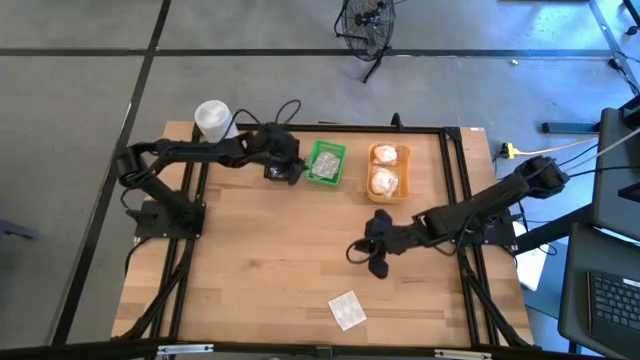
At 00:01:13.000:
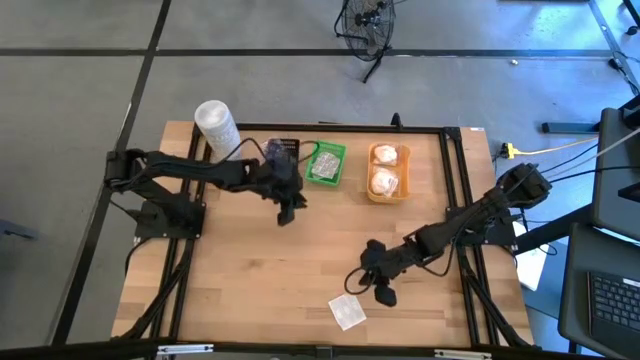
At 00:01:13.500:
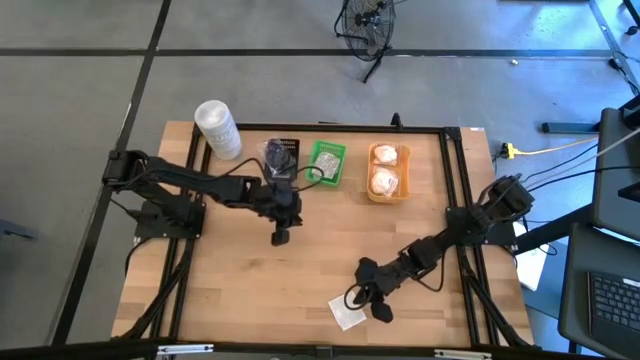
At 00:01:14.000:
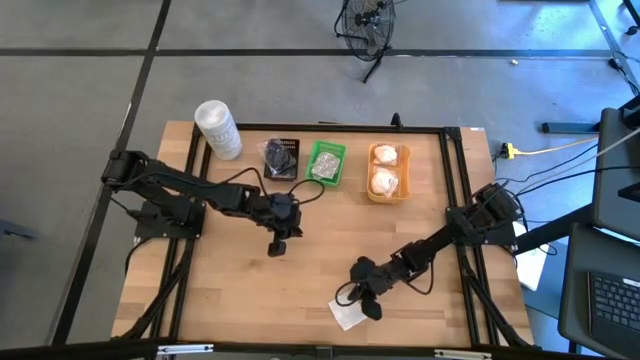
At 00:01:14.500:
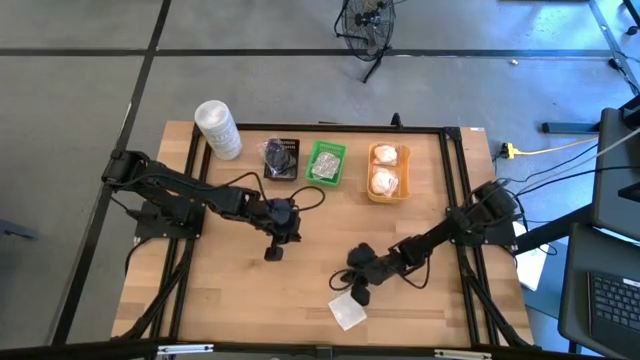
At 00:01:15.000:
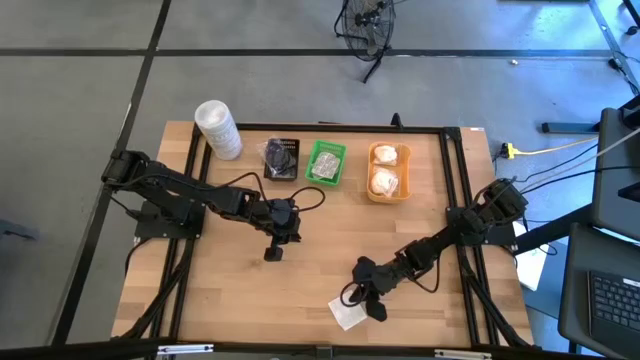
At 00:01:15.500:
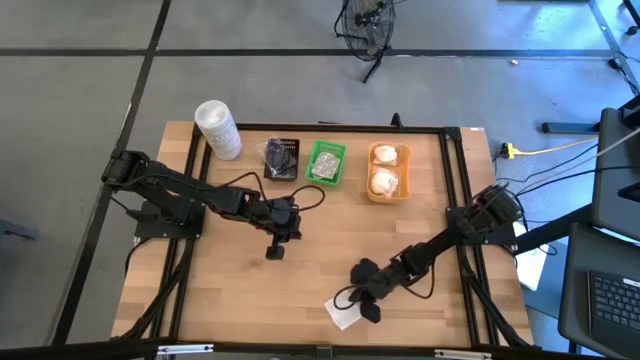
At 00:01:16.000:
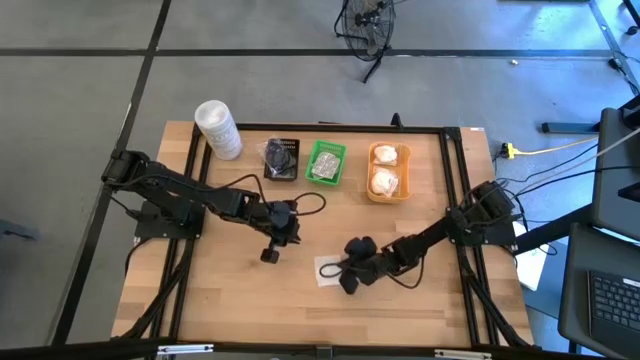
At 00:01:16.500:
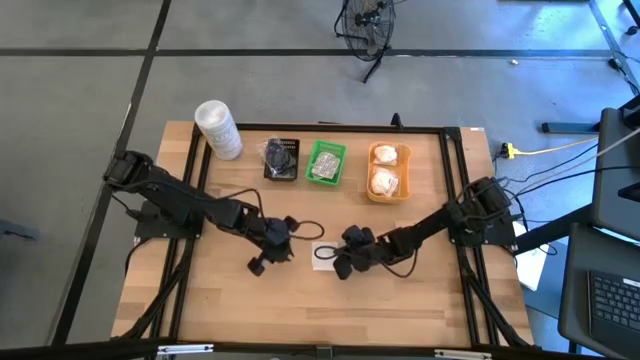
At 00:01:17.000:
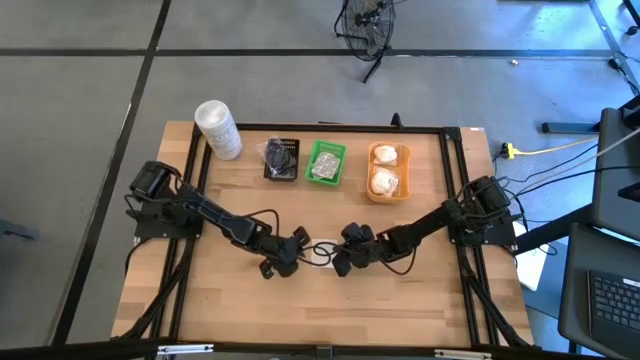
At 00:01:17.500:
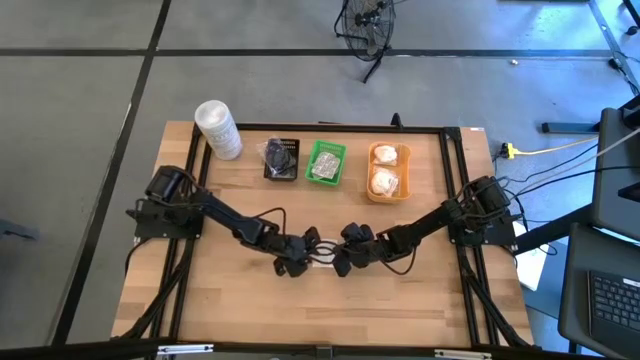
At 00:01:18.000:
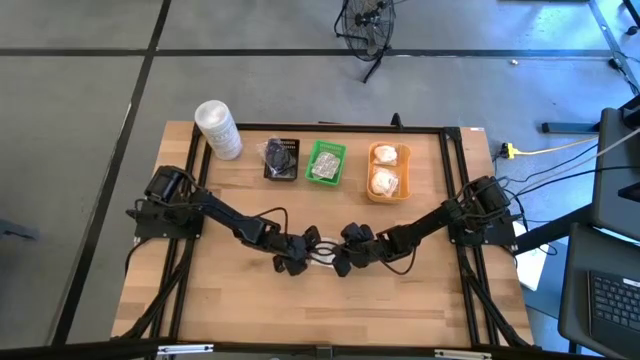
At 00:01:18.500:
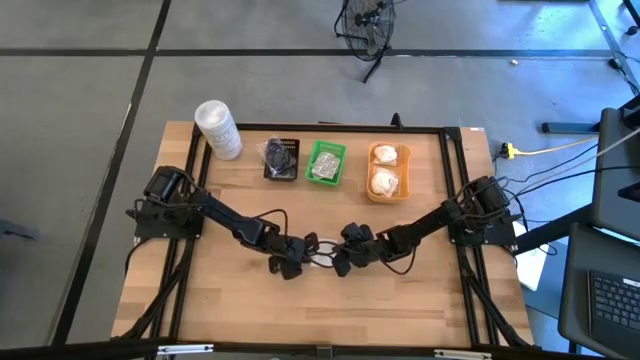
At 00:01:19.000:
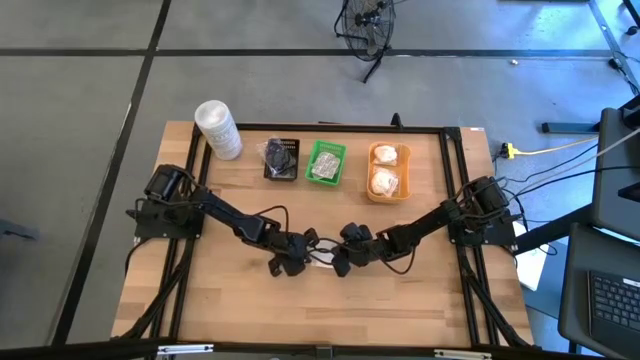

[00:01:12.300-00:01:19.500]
Task: Pick & Place Travel size toiletries
Put the white bandage pack into the green bin

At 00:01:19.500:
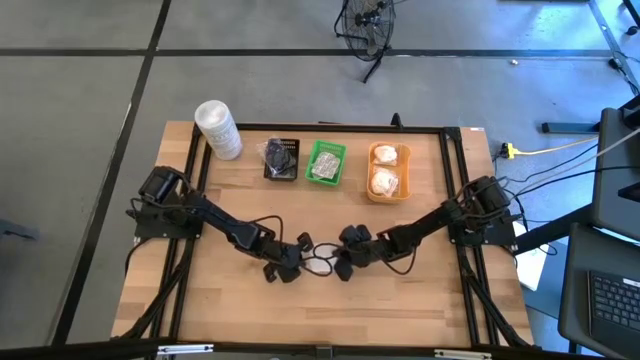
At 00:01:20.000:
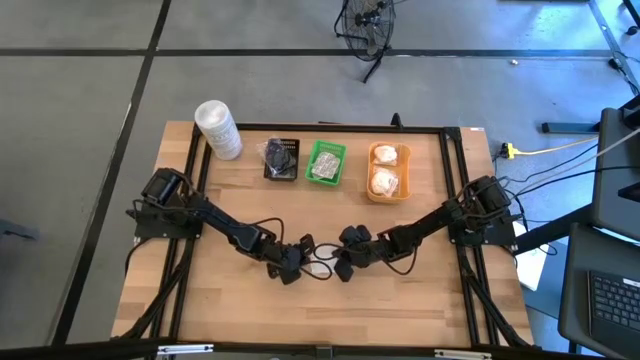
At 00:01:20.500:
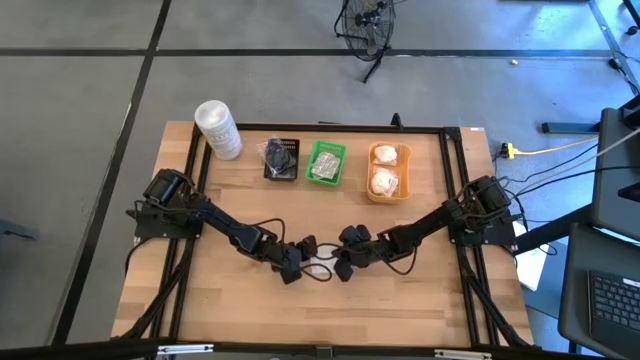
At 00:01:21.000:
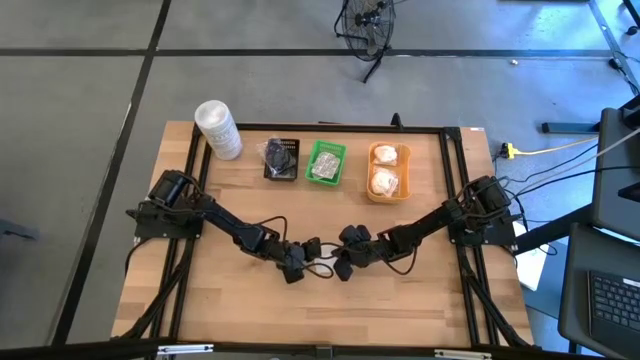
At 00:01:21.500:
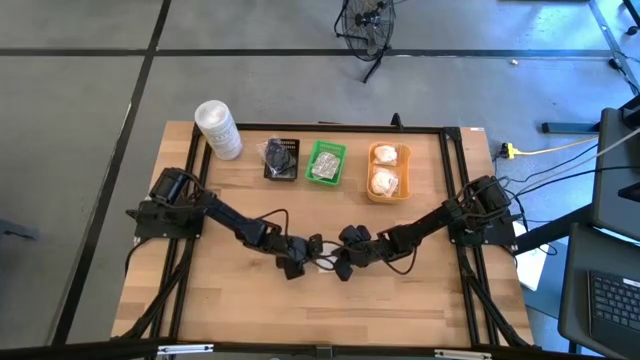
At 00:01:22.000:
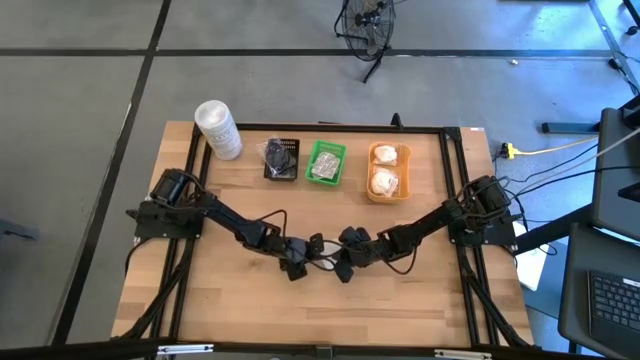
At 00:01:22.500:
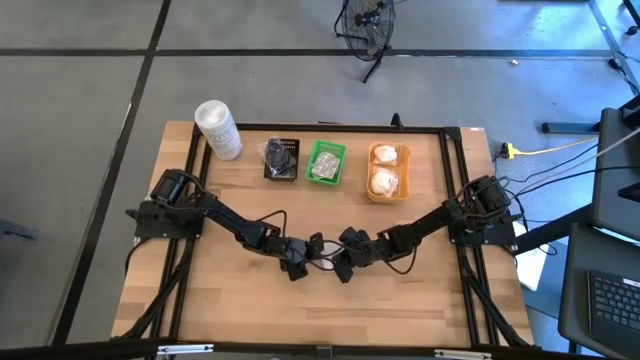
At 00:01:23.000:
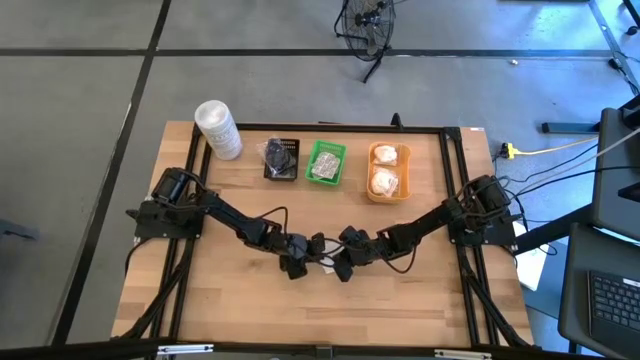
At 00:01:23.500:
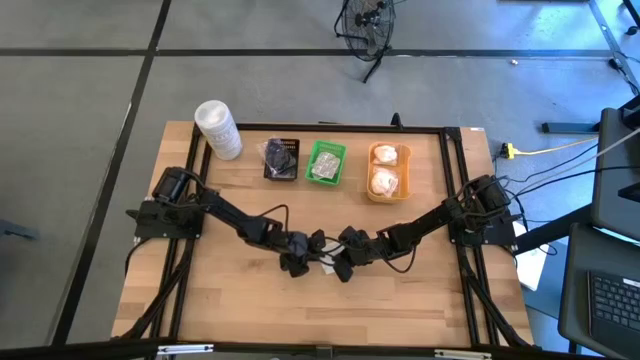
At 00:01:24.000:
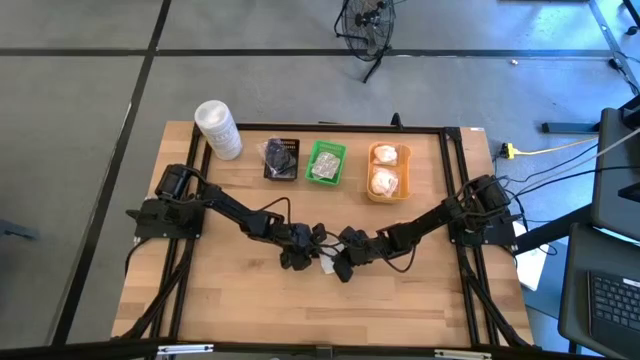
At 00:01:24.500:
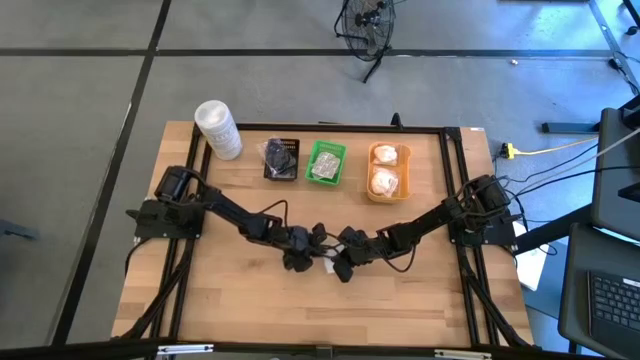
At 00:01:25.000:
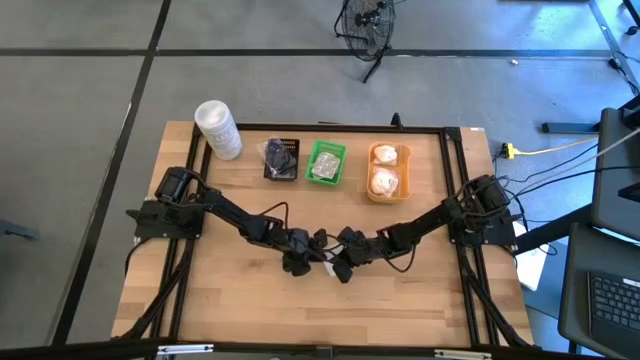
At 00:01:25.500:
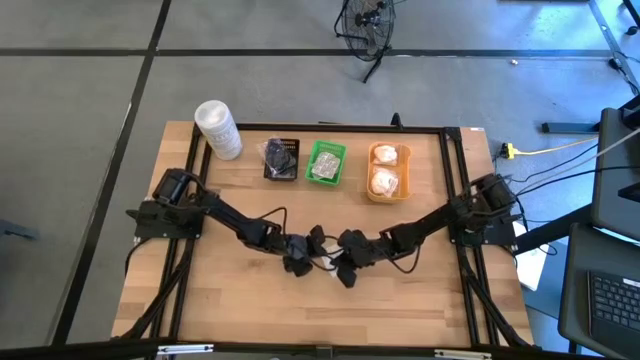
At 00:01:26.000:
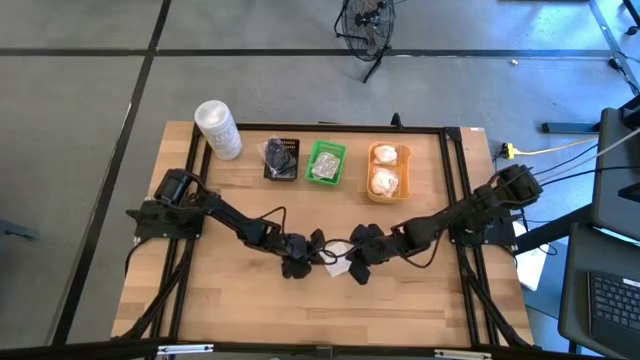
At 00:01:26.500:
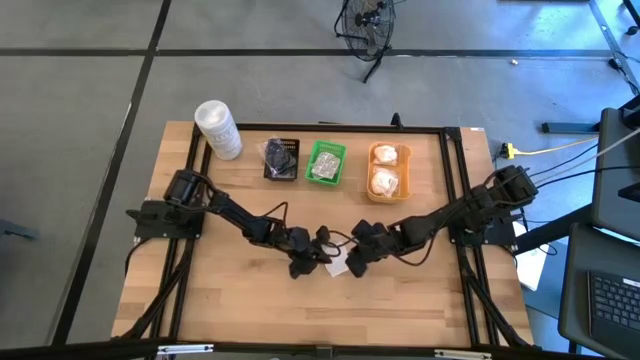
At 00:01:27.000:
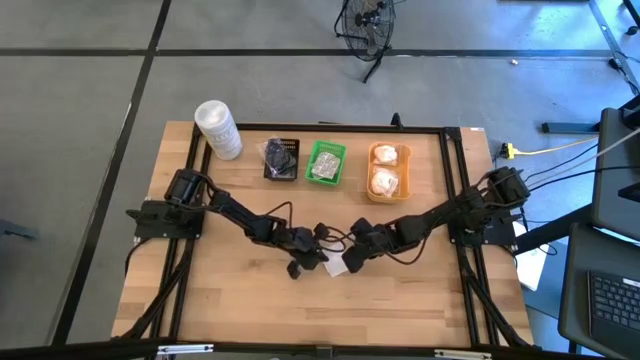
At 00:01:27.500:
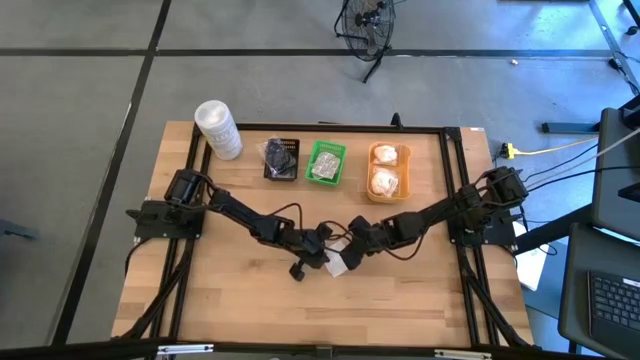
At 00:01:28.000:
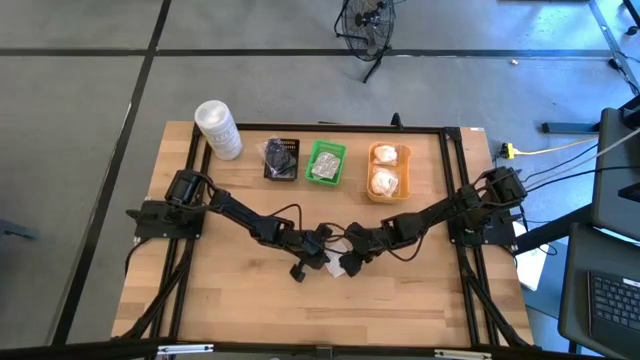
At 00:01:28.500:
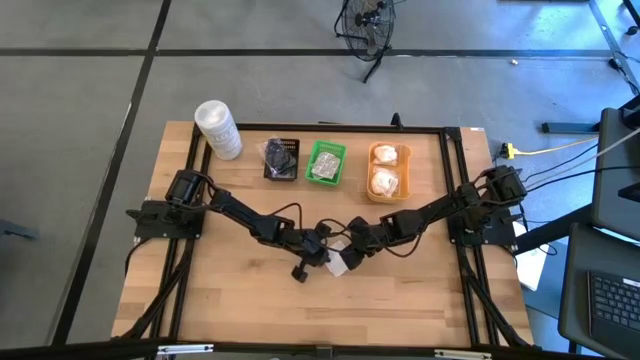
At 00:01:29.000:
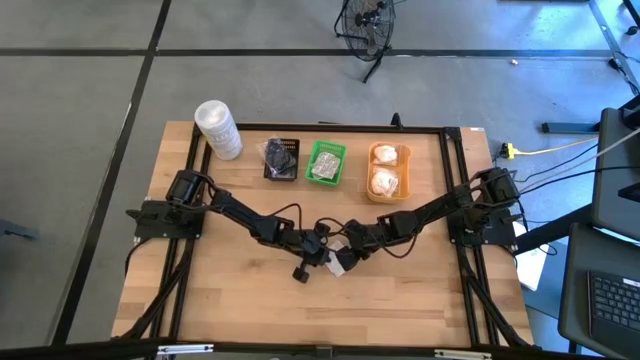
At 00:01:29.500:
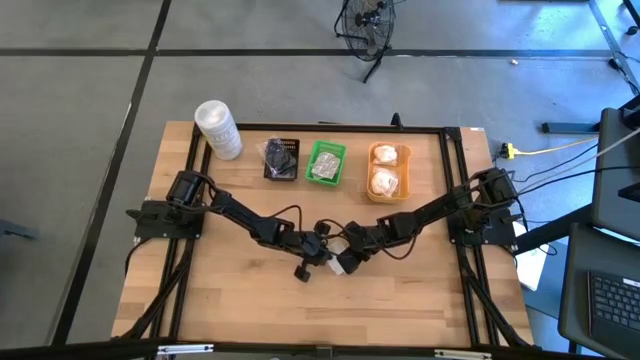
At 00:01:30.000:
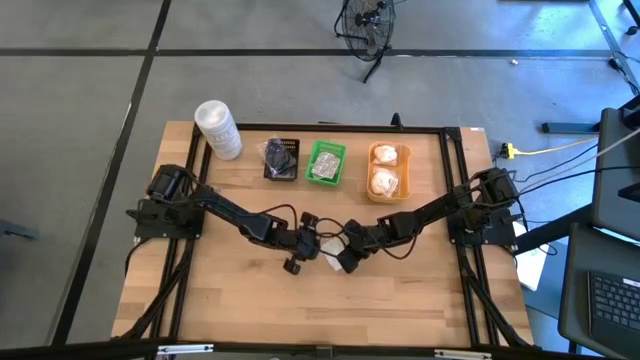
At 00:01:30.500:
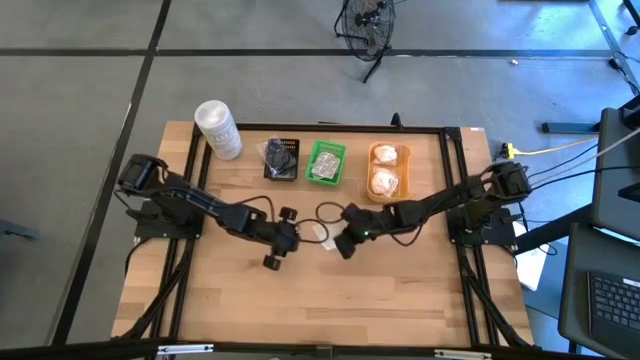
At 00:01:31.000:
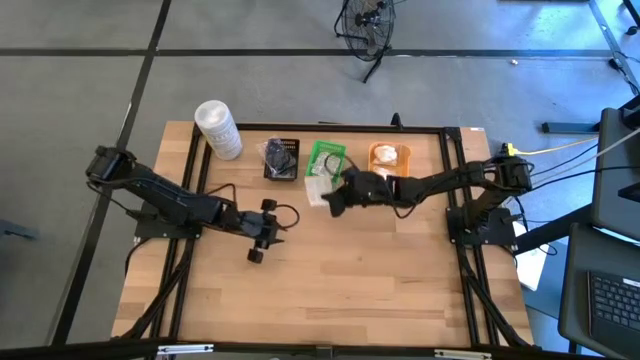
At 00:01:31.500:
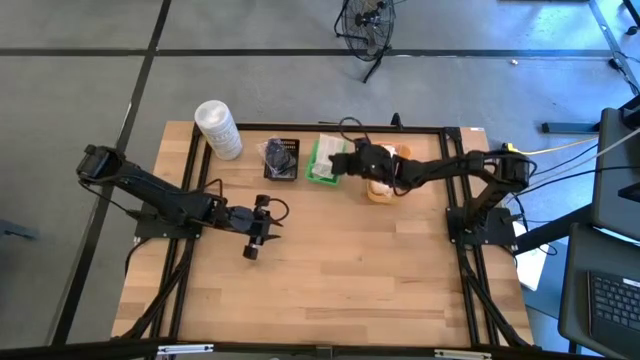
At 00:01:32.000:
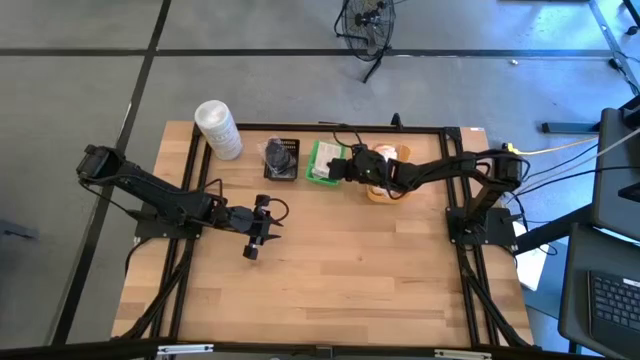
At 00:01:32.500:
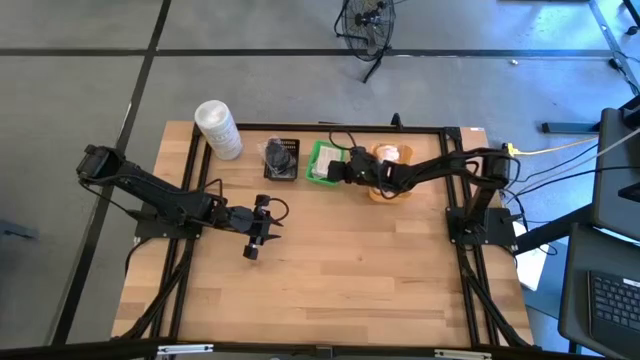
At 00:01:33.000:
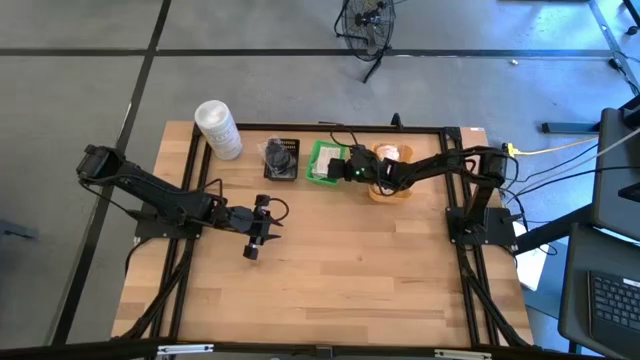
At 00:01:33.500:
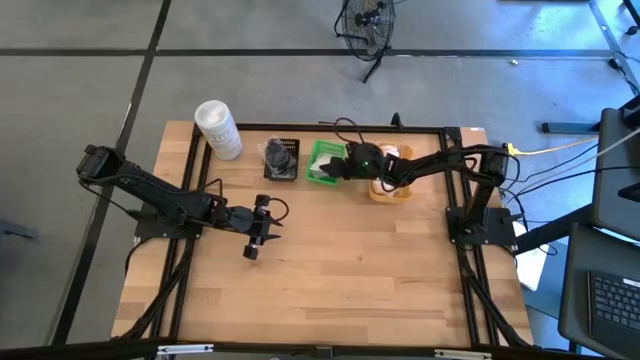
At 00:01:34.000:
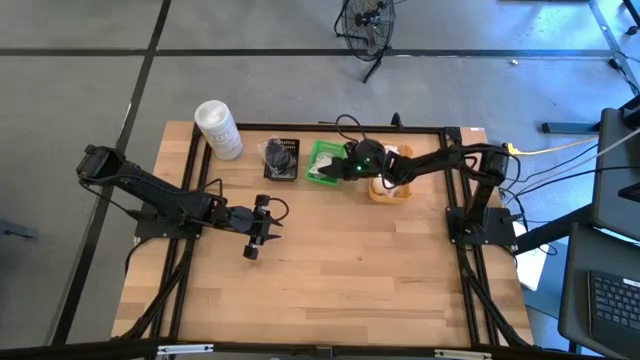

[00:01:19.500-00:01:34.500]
Put the white bandage pack into the green bin
